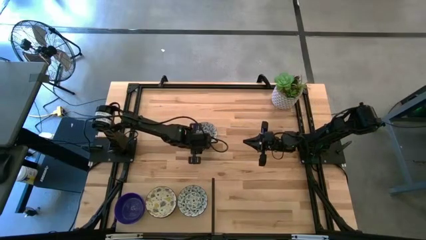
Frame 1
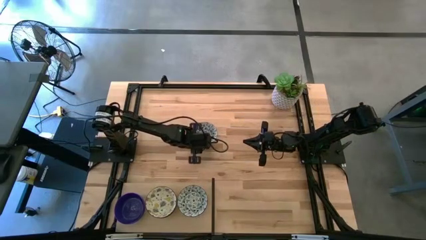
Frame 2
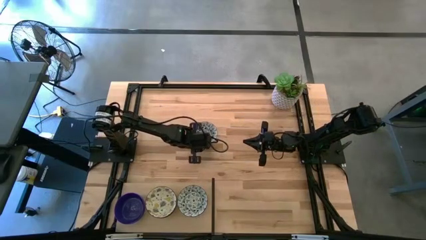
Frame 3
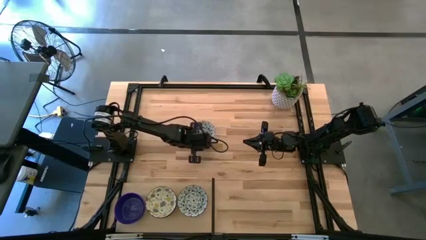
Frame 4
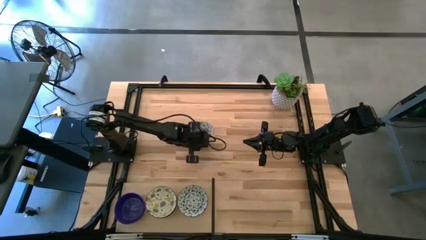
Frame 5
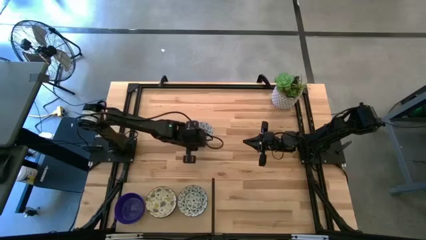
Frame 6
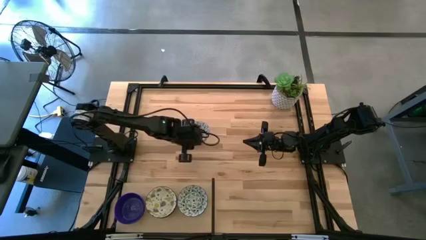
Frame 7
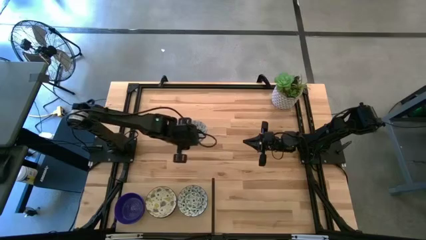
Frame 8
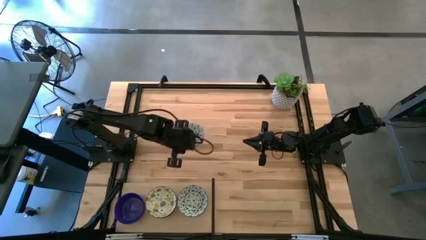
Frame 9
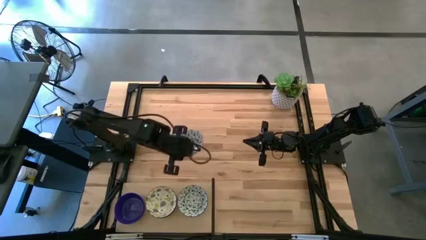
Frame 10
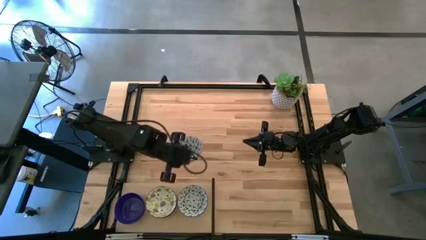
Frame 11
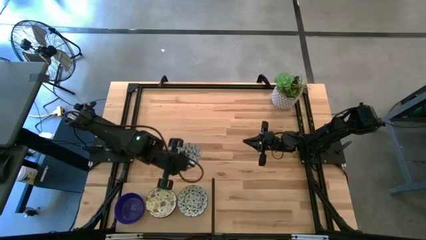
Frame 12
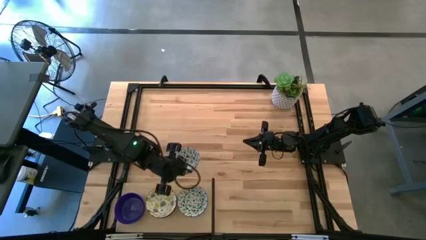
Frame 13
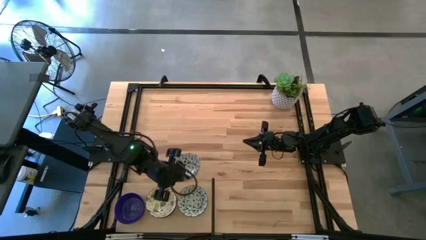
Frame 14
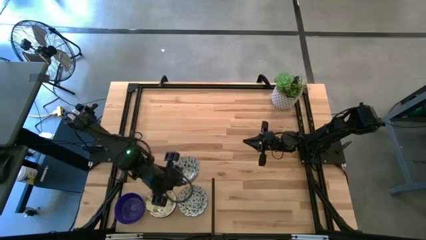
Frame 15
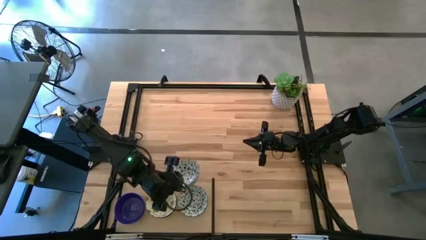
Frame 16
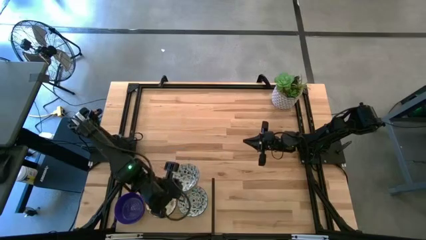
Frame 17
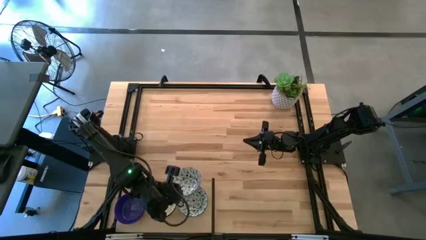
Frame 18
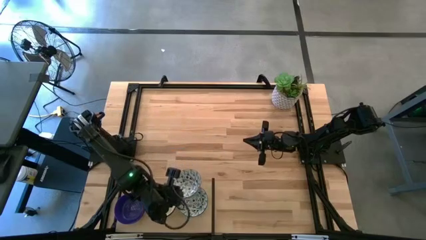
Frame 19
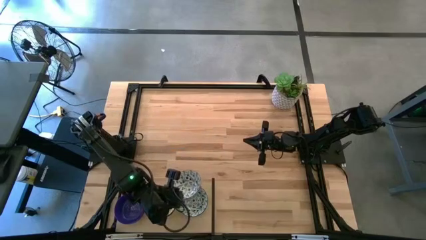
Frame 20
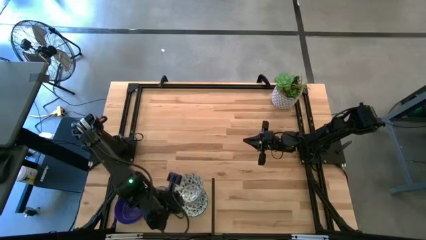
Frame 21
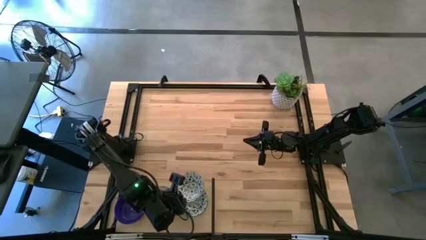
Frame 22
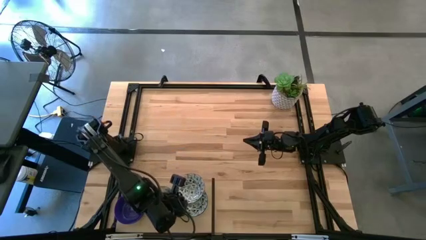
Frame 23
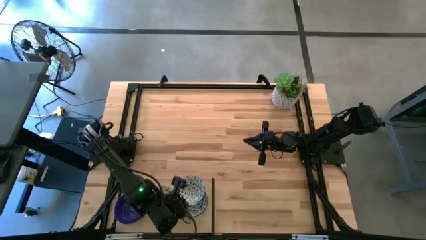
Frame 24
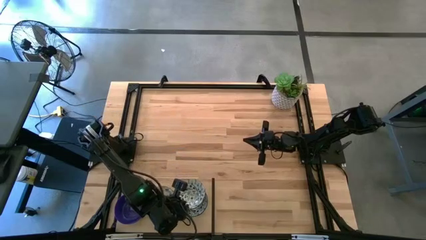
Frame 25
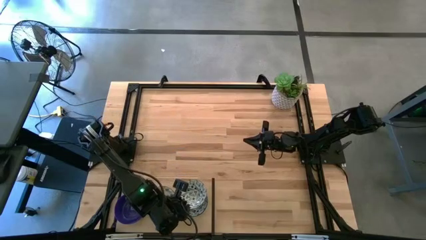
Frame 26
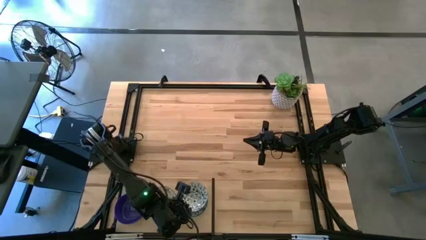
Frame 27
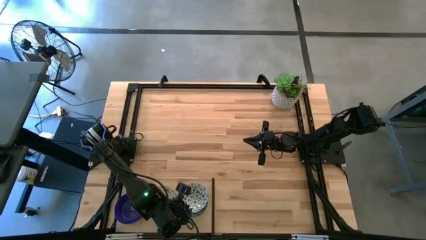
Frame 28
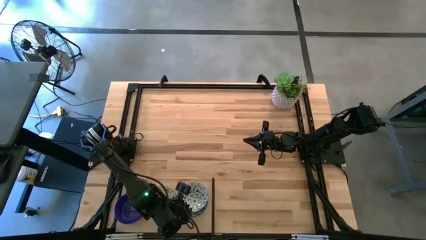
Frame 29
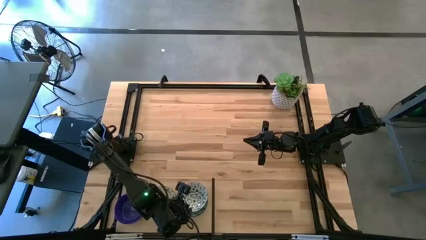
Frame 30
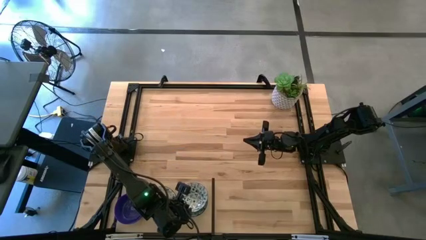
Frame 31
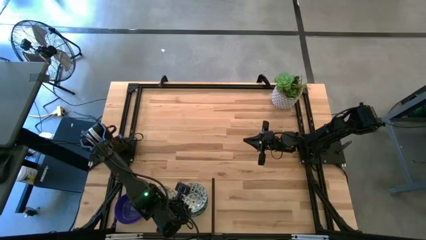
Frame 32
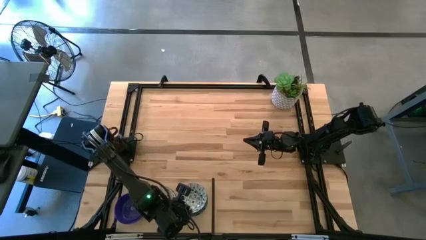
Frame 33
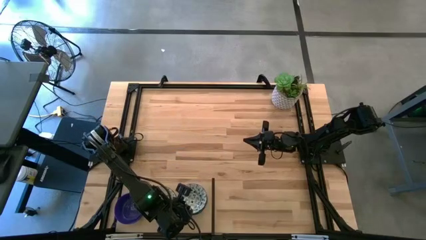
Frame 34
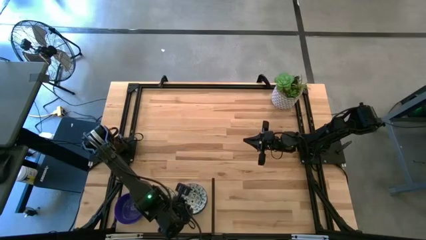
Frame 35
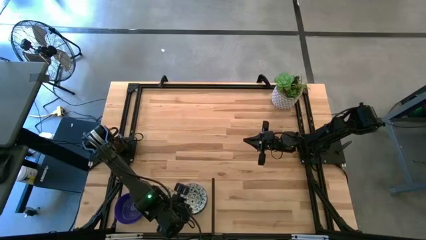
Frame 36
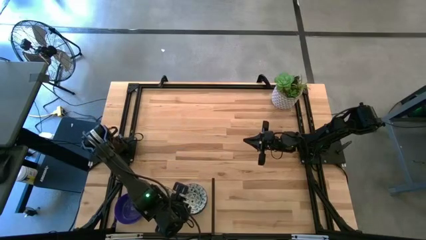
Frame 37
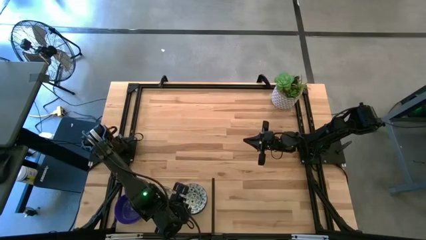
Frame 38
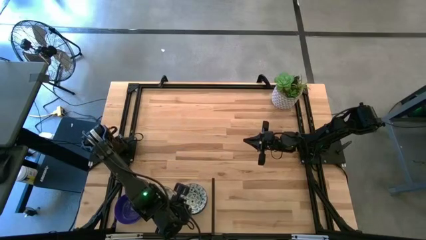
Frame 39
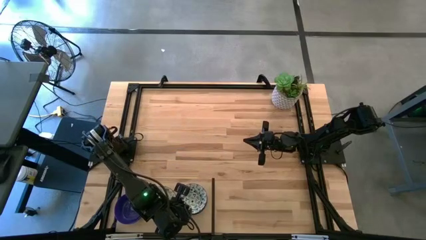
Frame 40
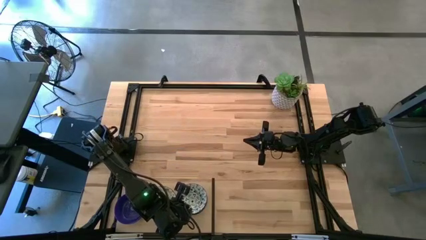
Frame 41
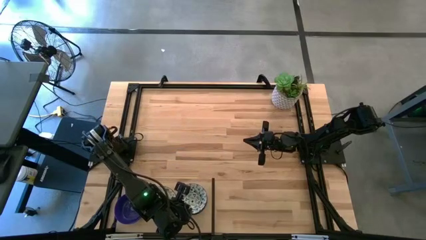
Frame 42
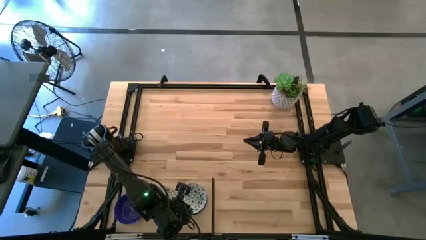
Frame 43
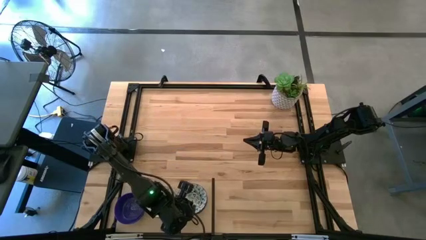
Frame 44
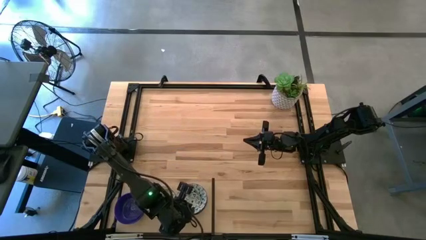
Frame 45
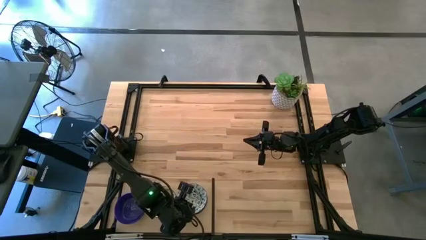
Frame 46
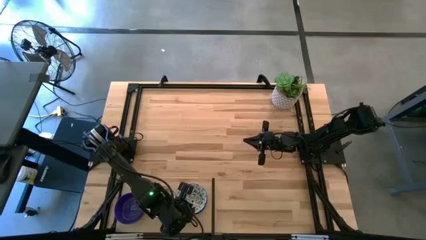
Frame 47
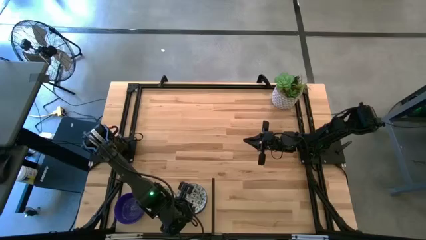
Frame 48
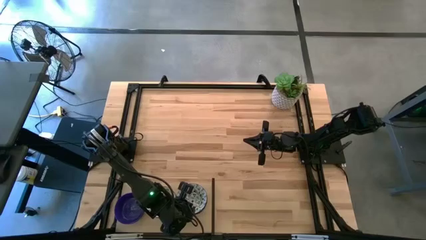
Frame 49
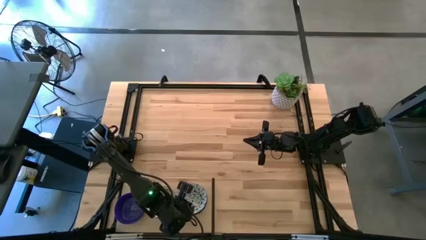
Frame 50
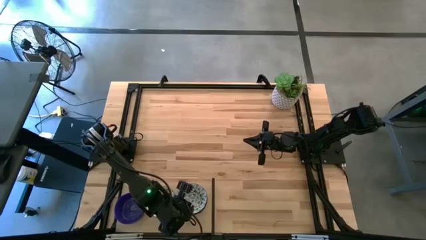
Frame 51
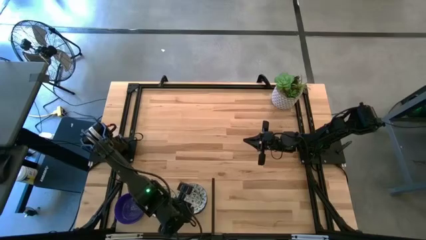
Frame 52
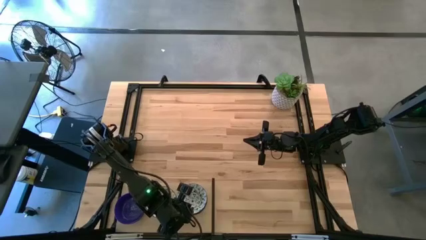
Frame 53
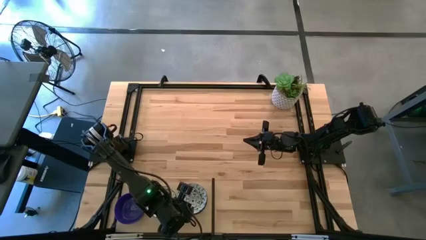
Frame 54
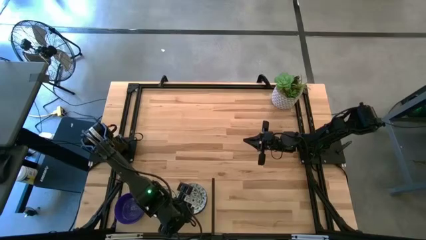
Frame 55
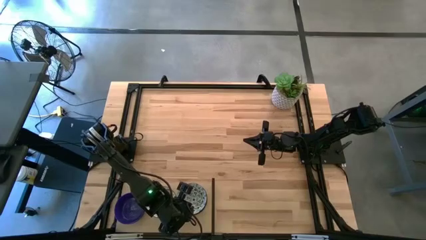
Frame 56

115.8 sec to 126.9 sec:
Task: Pick & Place Mini bowls
Stack the blue patterned bowl on top of the other stacked blue patterned bowls on the shelf

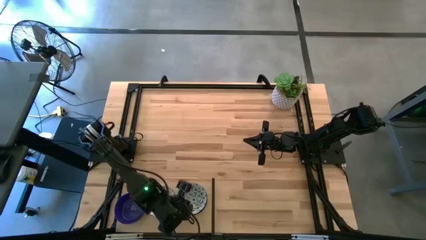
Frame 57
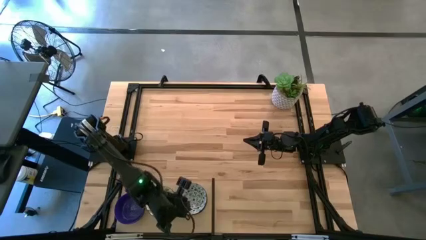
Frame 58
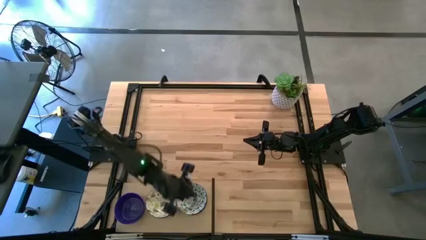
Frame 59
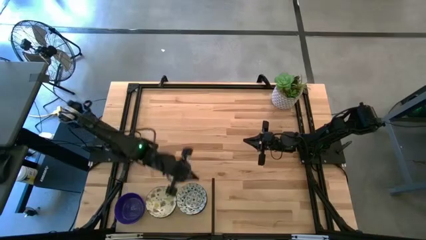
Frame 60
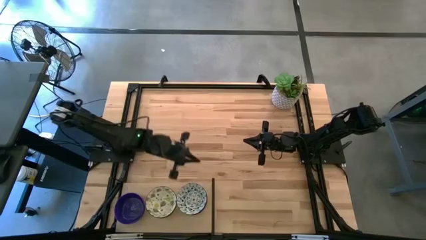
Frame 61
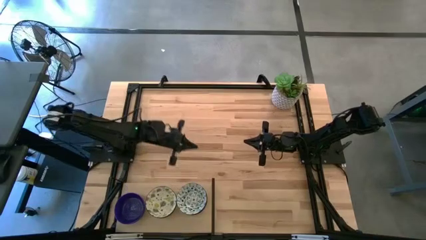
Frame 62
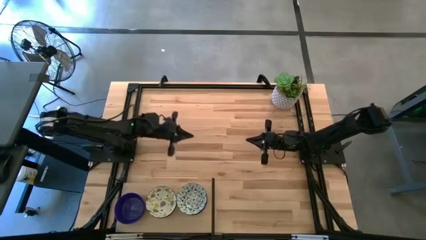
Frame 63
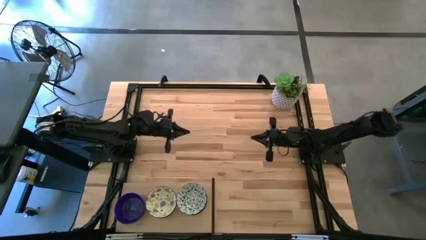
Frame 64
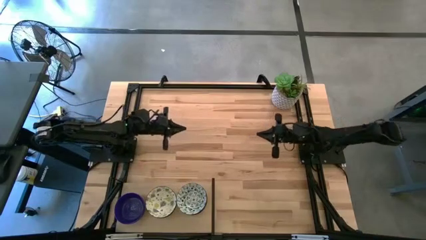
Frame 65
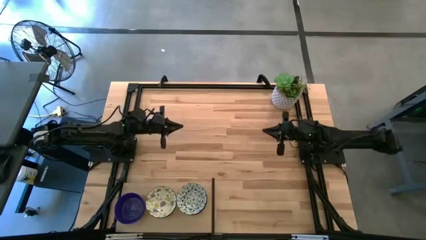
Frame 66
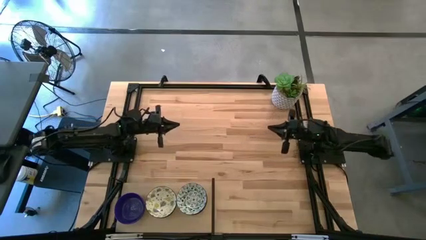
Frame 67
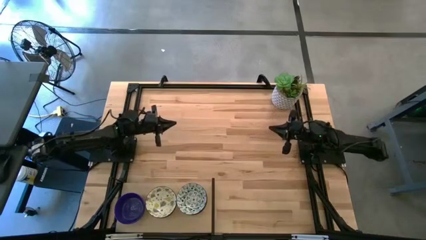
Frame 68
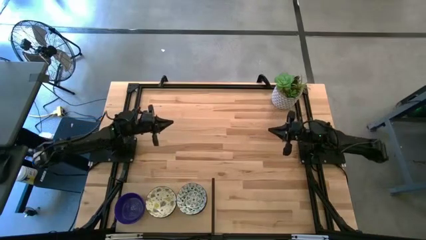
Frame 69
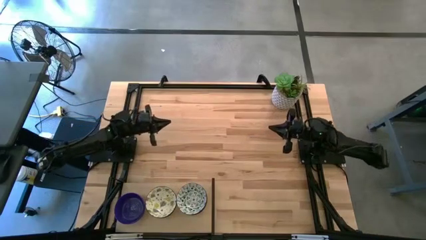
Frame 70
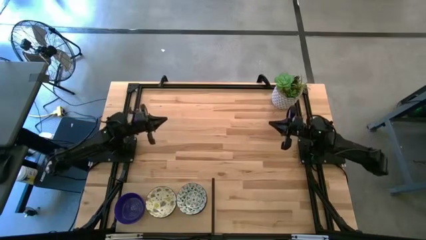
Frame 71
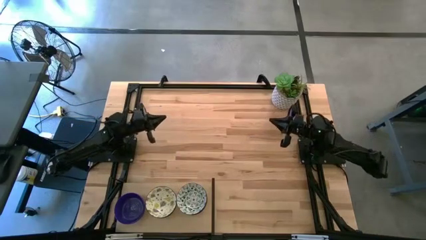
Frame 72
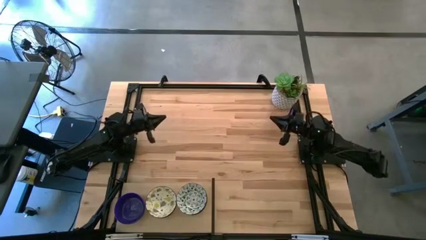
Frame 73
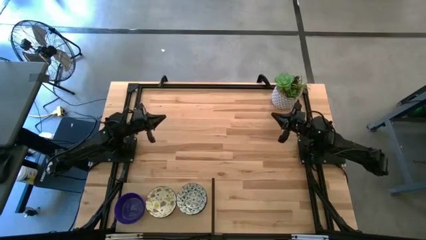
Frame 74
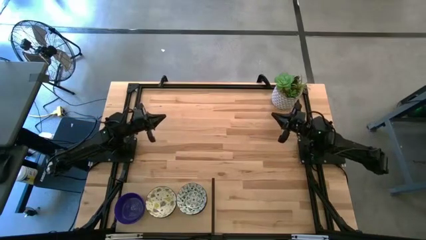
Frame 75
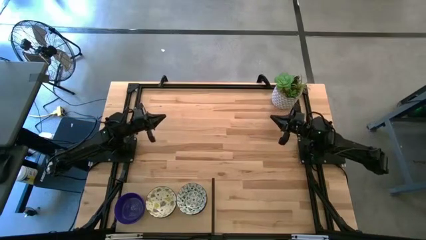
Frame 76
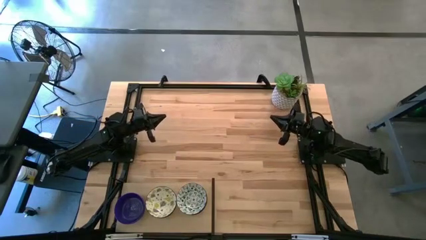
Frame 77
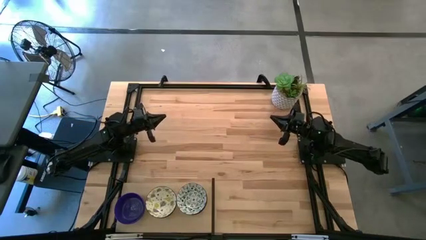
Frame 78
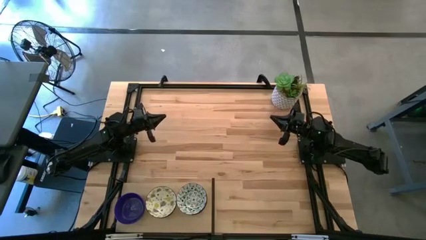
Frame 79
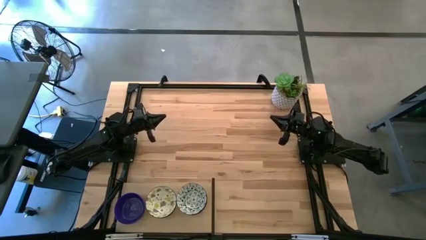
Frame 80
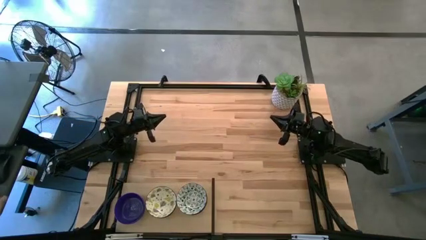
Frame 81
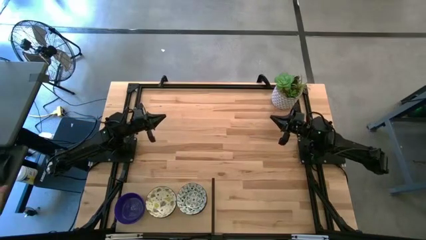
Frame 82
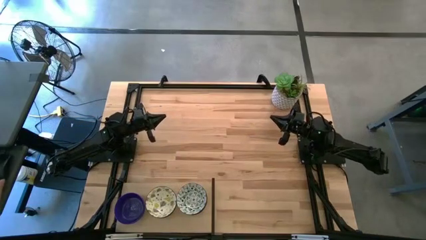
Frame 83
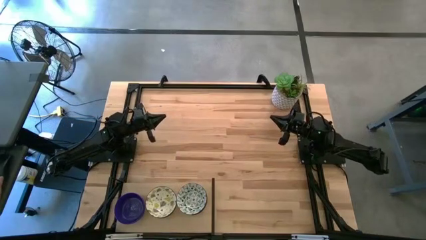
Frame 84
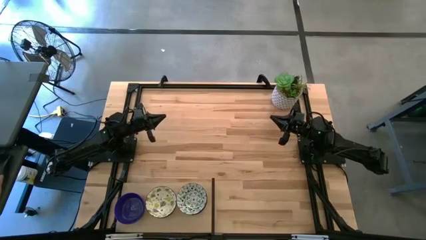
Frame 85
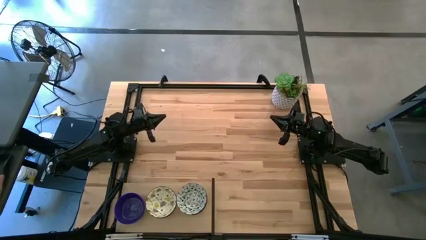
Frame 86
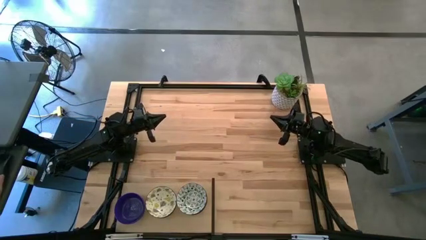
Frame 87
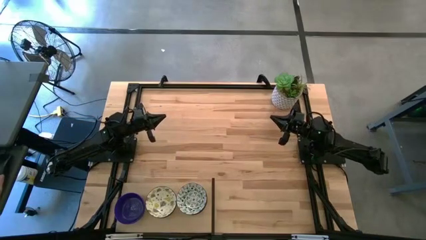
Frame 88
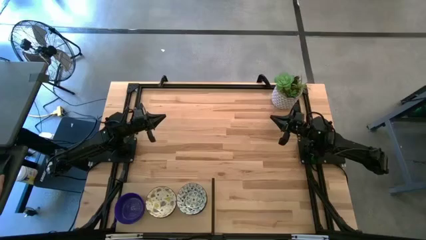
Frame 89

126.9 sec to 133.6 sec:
Return to Home Position
